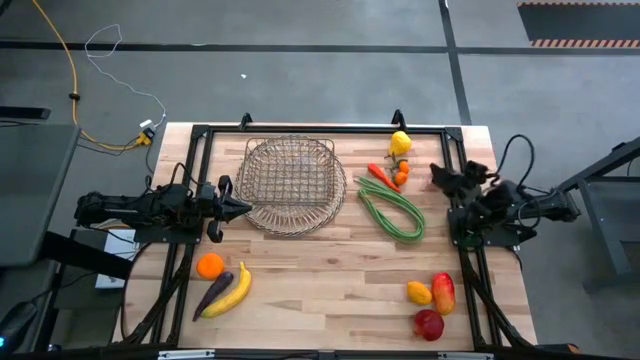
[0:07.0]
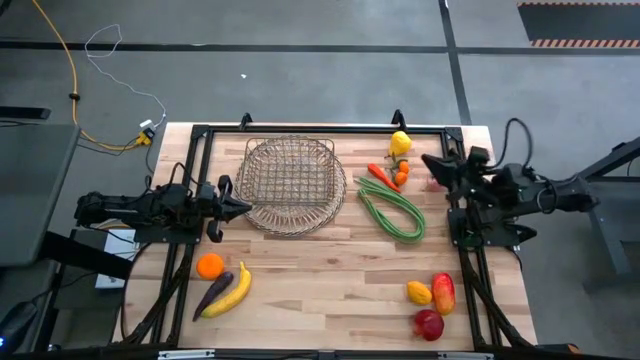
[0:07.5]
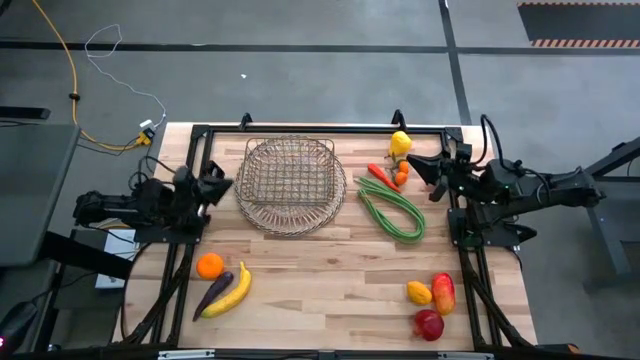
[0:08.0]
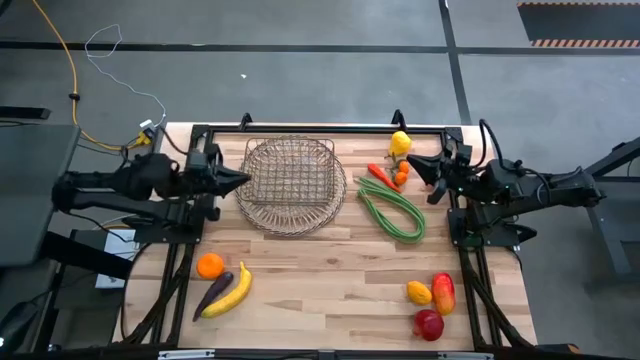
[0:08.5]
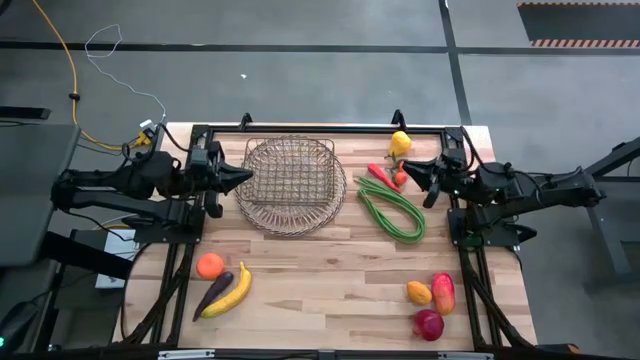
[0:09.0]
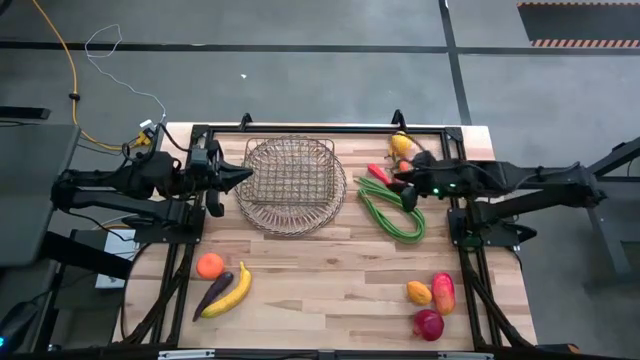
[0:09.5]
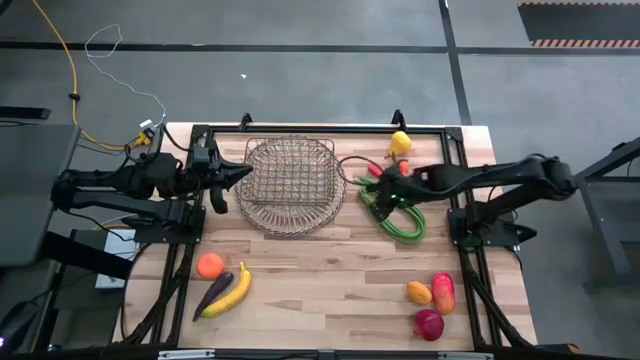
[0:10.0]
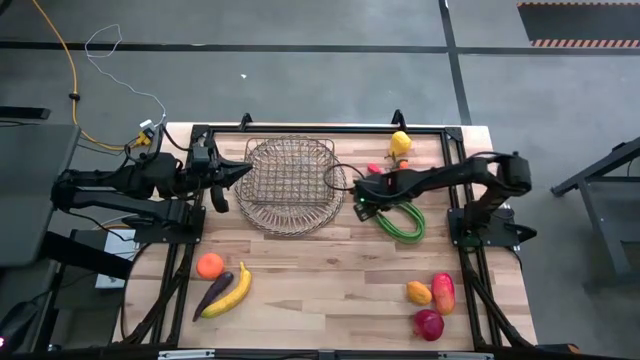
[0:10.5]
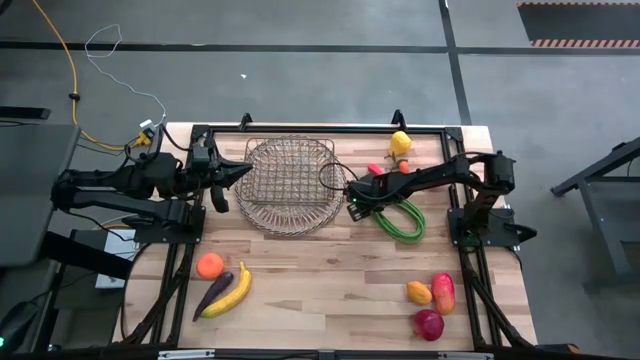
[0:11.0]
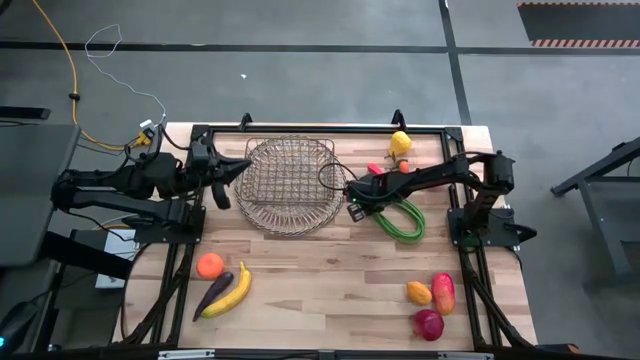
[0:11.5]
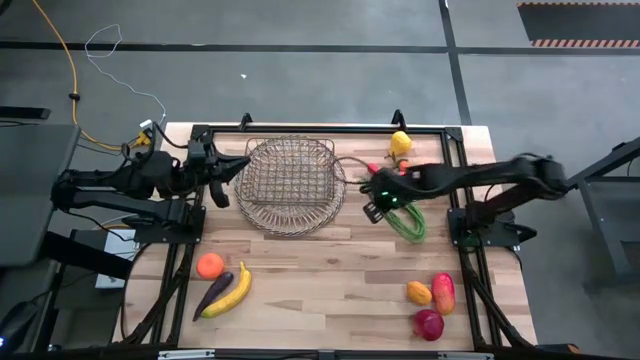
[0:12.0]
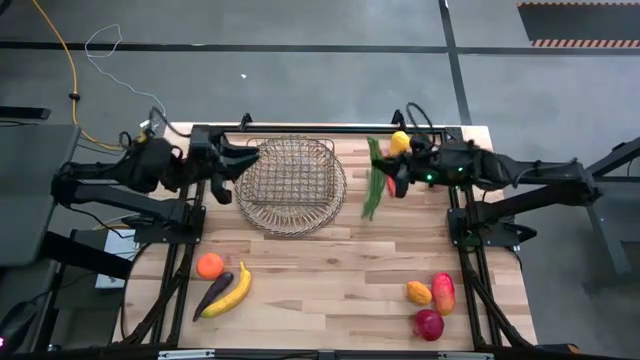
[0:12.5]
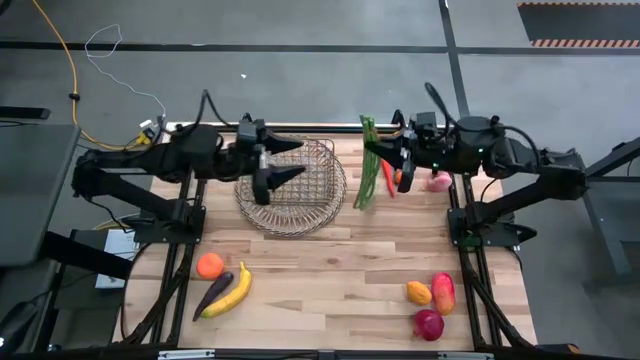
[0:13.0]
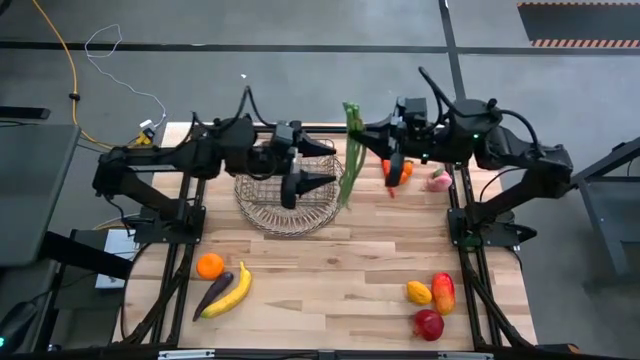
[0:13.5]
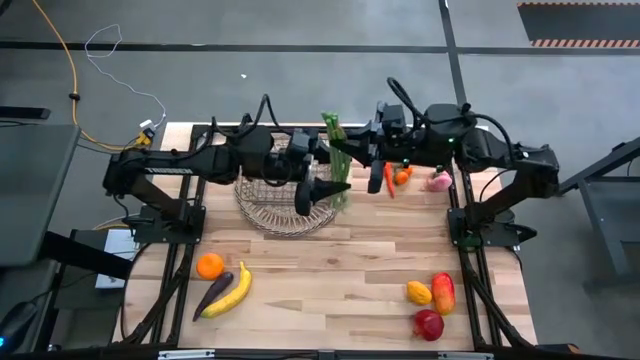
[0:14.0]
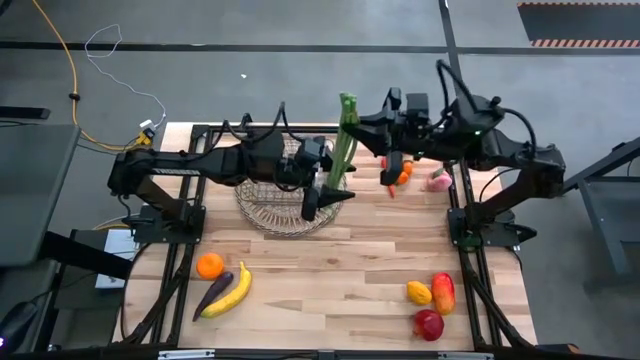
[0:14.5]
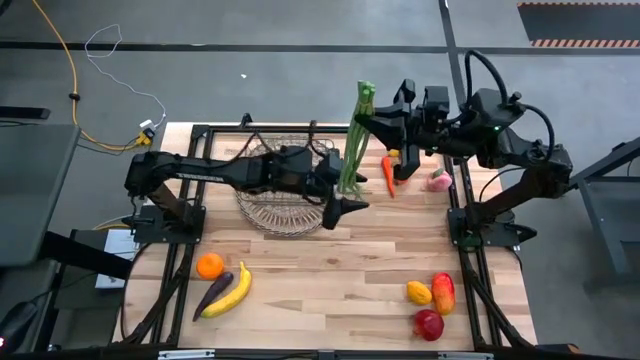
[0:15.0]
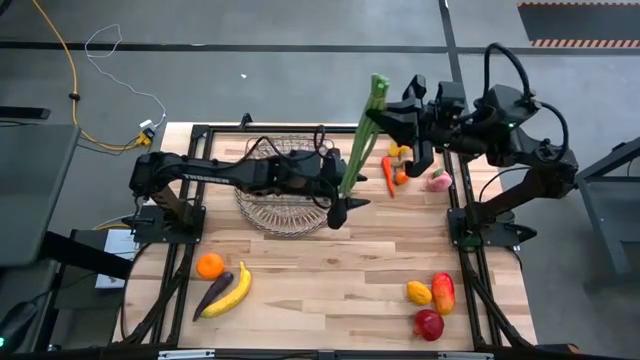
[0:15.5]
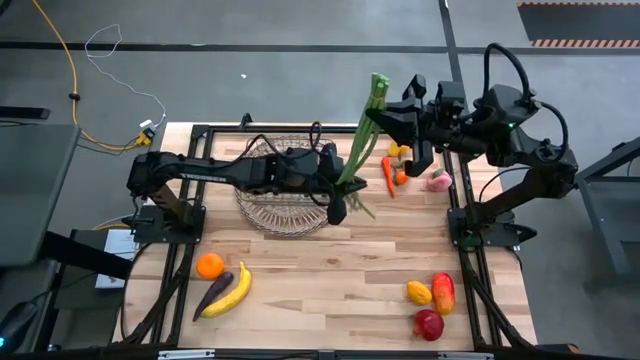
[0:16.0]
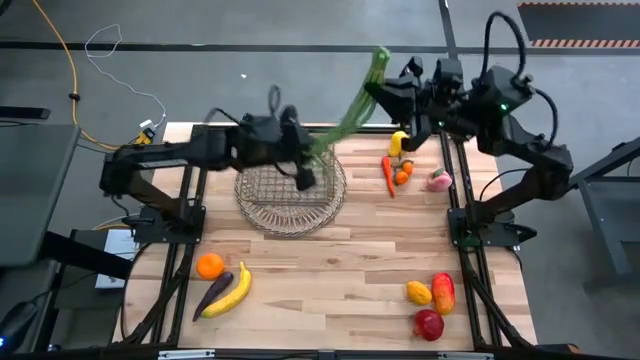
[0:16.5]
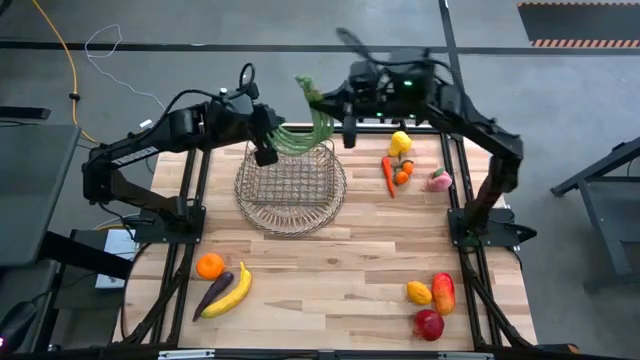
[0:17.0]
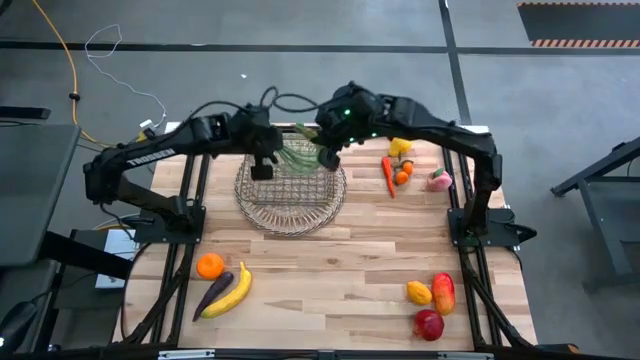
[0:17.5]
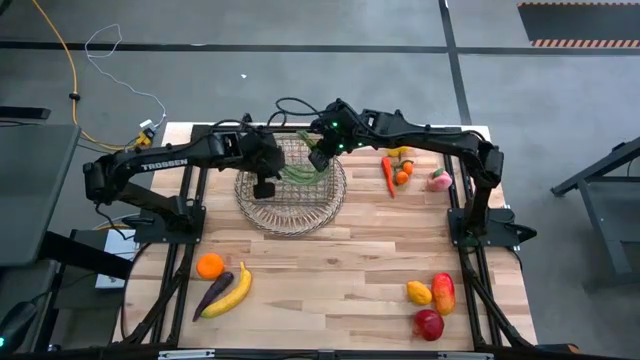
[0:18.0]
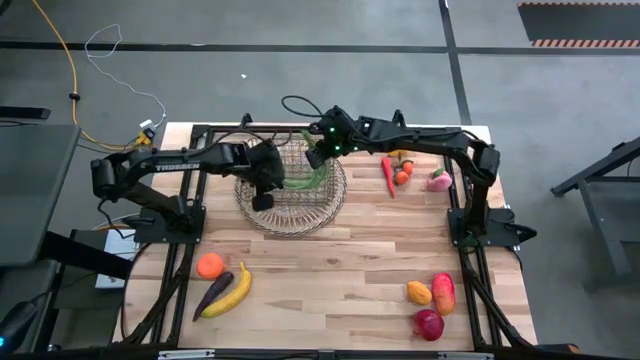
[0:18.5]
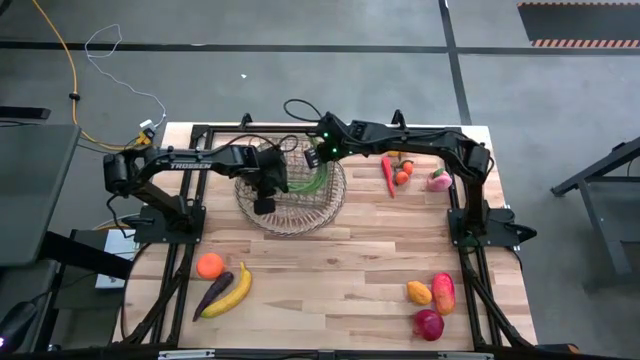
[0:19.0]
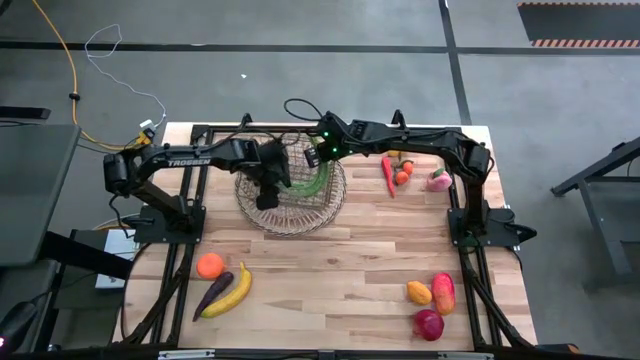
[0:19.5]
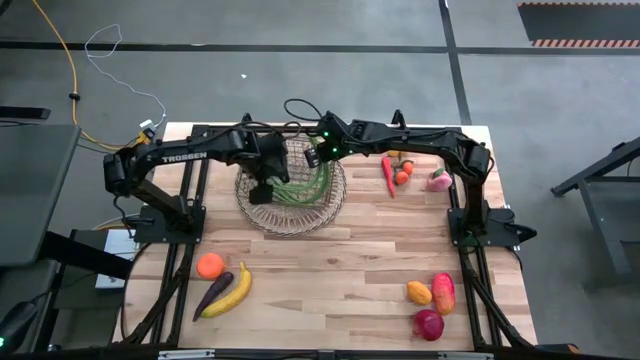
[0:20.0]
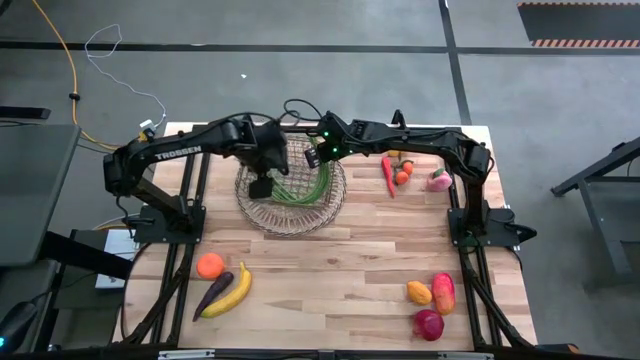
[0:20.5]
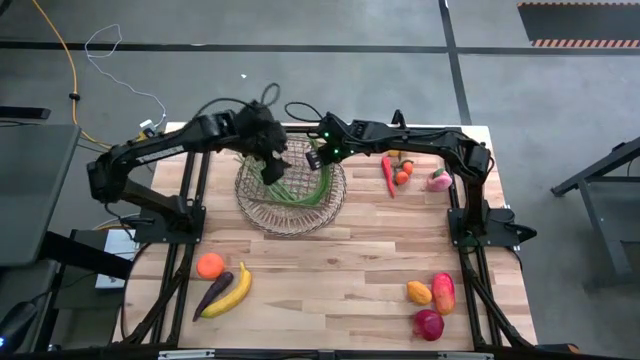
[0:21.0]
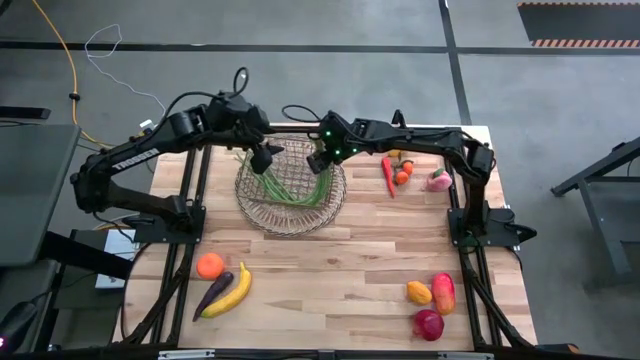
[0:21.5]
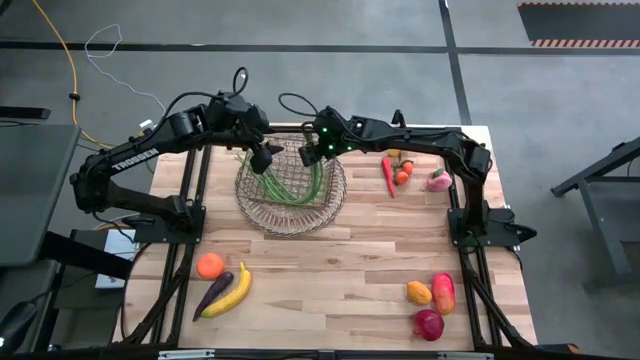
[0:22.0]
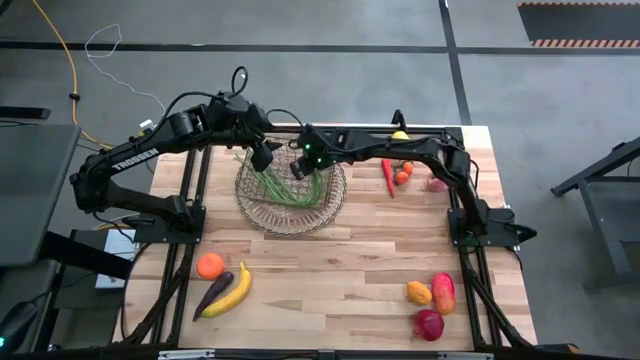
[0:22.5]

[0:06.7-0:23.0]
Task: Build produce basket
Put the green string beans into the wire basket

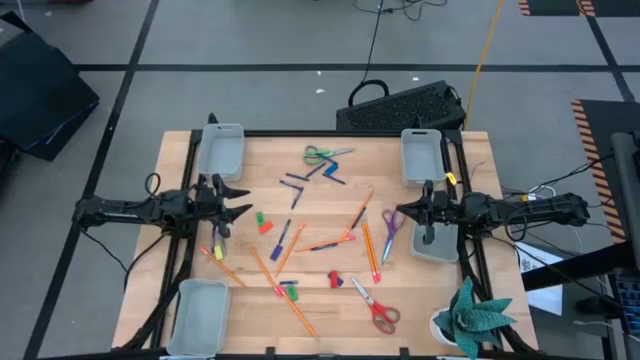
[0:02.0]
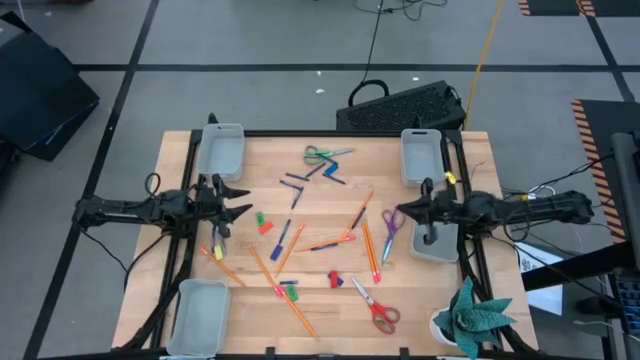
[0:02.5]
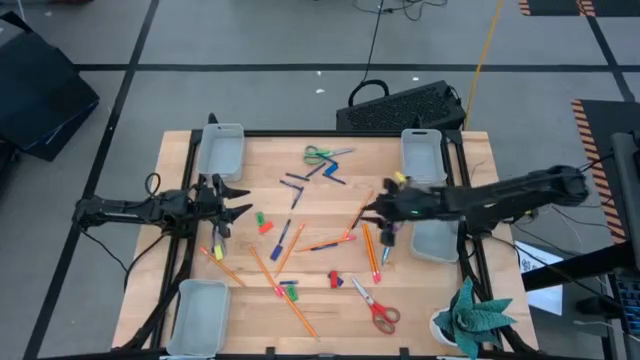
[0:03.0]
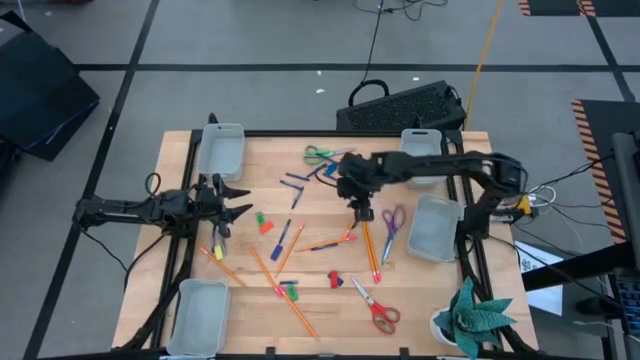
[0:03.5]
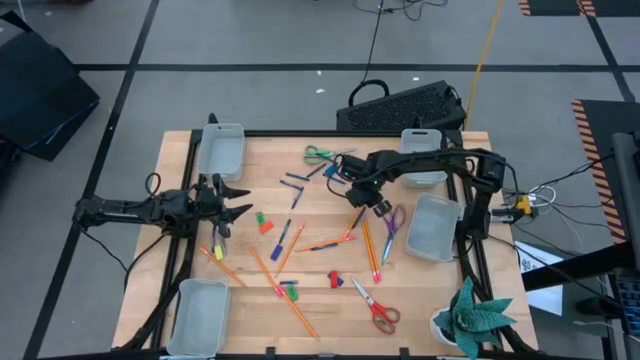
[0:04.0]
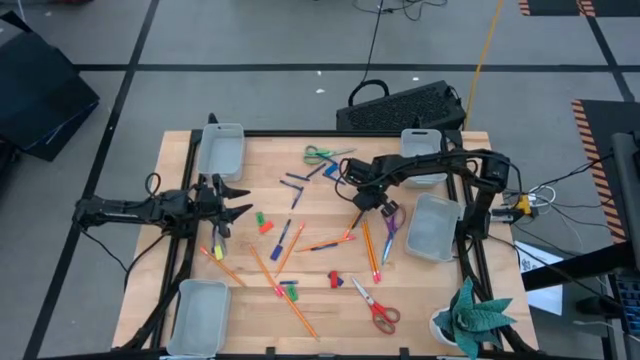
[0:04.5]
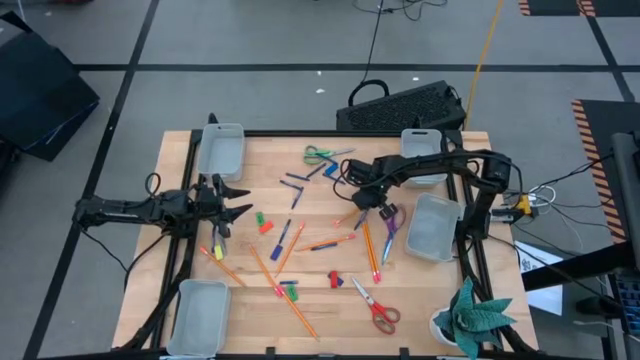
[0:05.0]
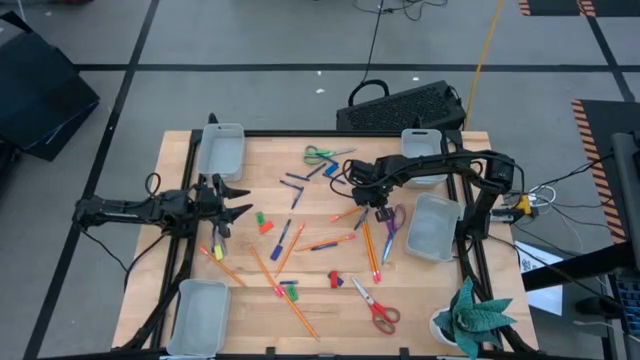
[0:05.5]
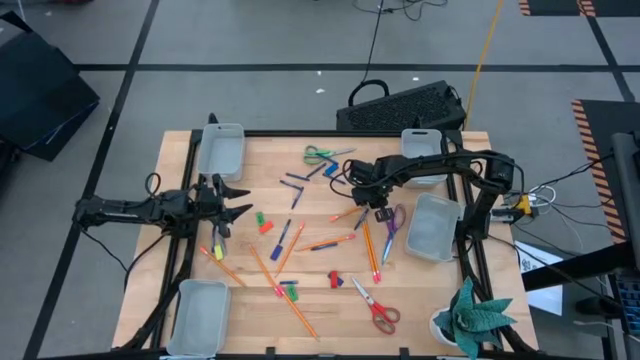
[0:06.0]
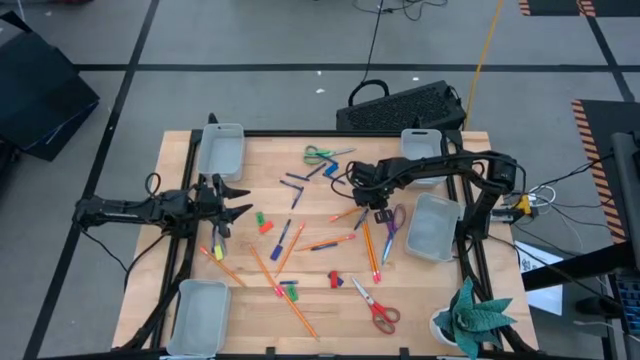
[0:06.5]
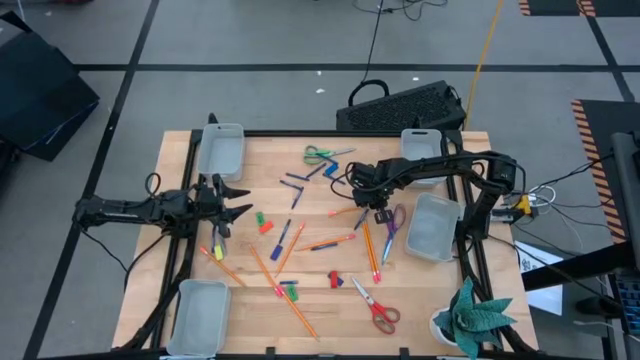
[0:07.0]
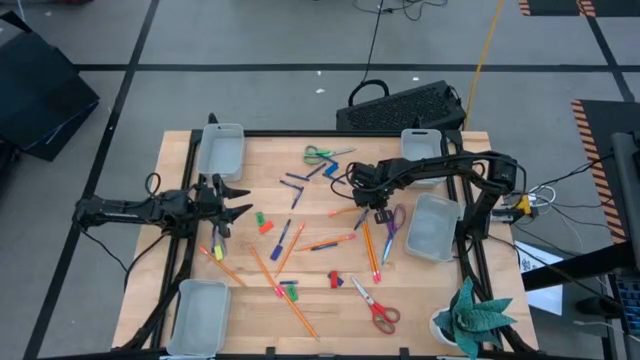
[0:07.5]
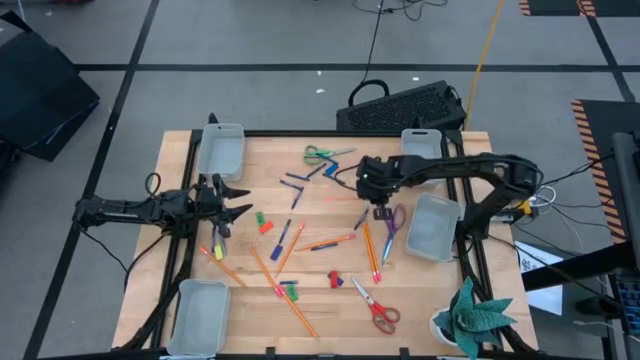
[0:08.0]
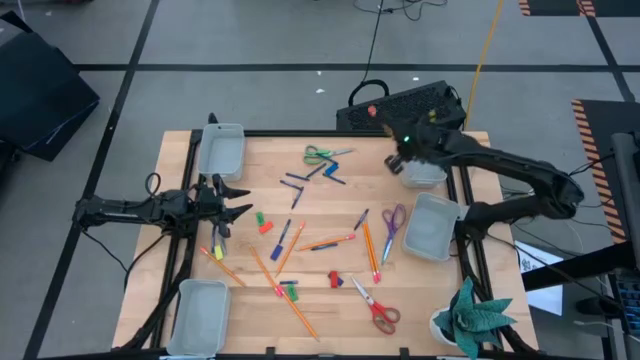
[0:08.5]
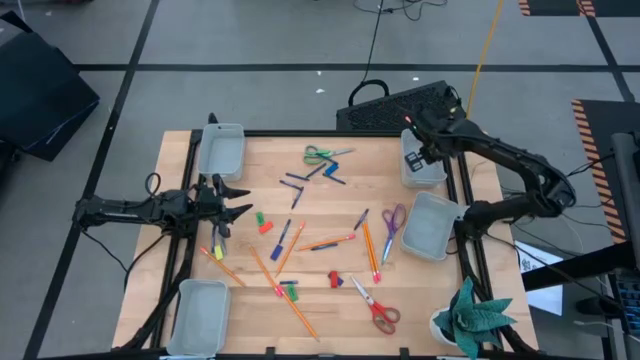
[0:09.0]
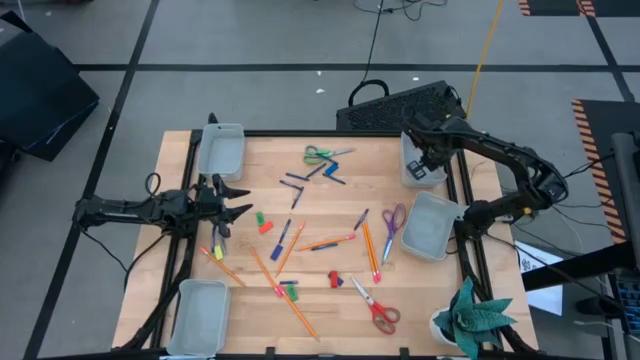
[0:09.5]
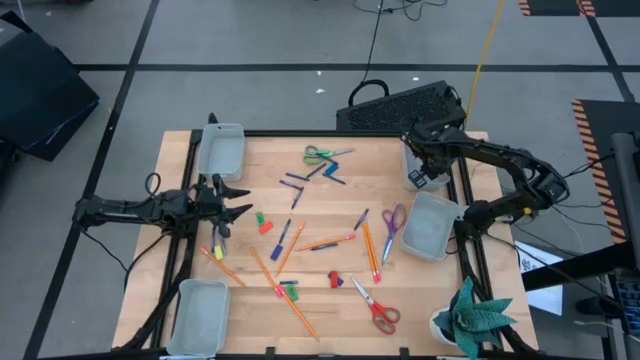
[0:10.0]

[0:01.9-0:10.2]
Task: Sort crayons/erasers/pens/pencils in bins
Put the orange pencil into the top right gray bin
